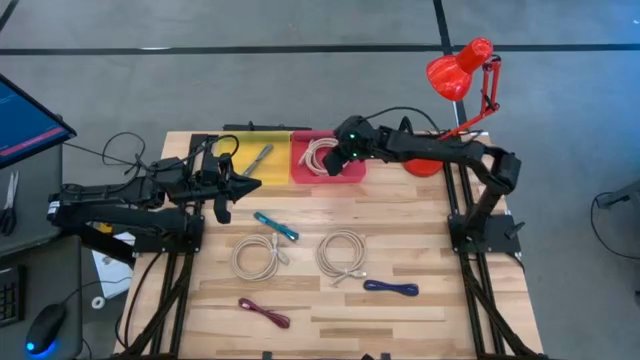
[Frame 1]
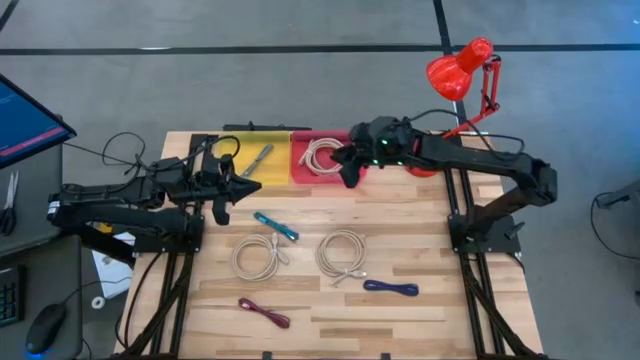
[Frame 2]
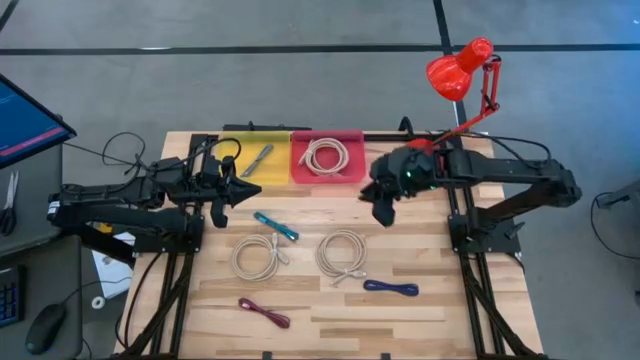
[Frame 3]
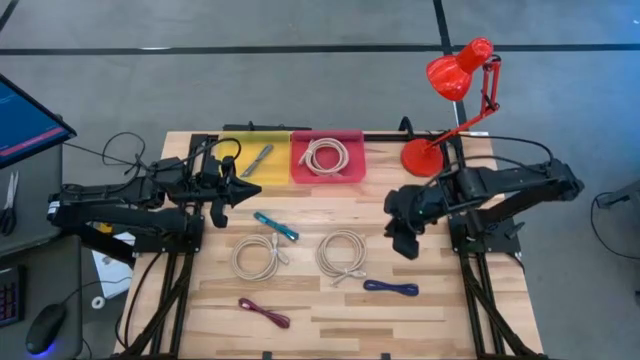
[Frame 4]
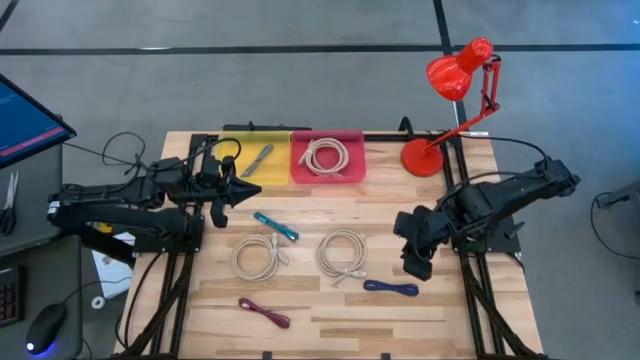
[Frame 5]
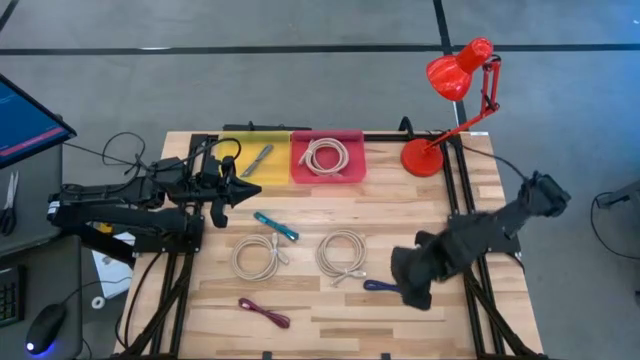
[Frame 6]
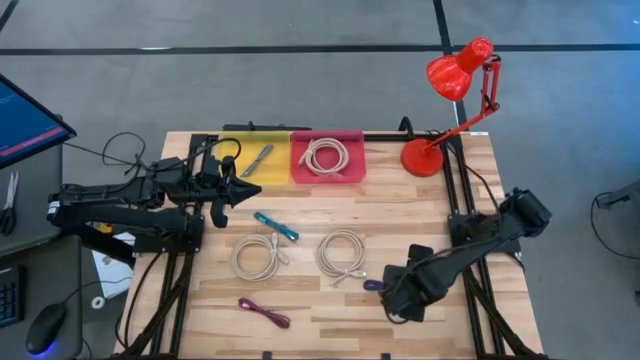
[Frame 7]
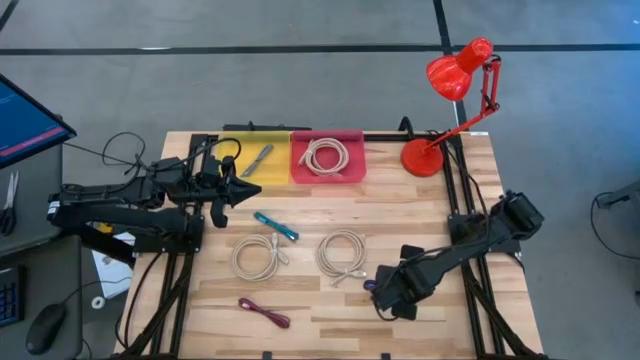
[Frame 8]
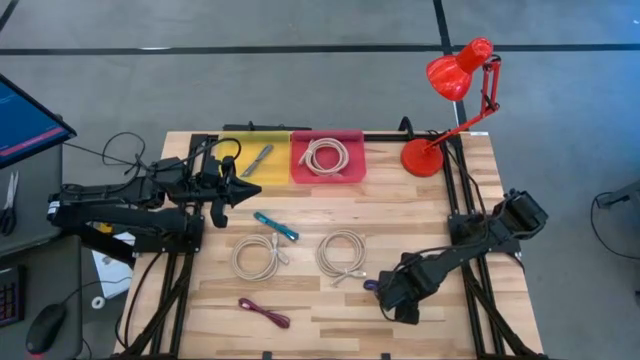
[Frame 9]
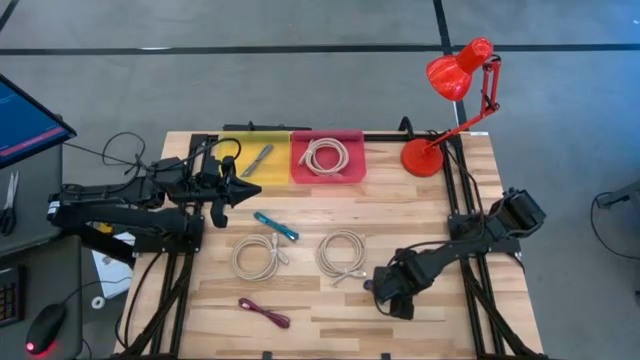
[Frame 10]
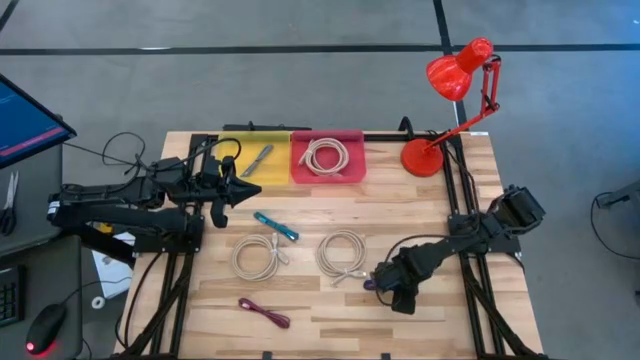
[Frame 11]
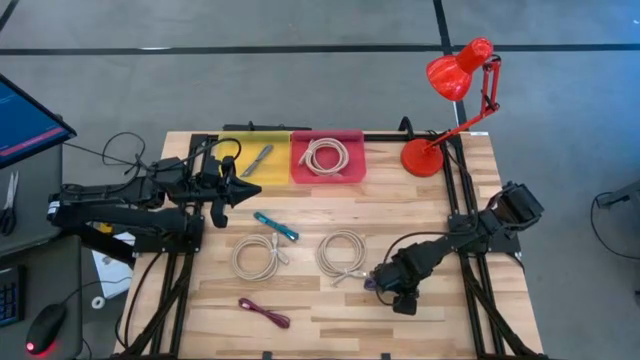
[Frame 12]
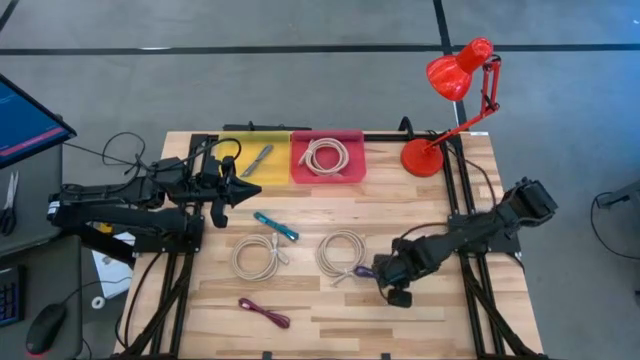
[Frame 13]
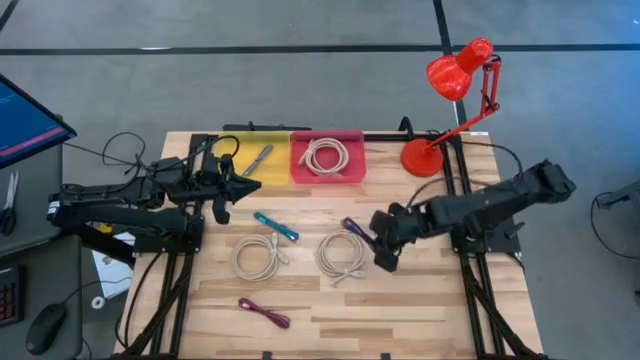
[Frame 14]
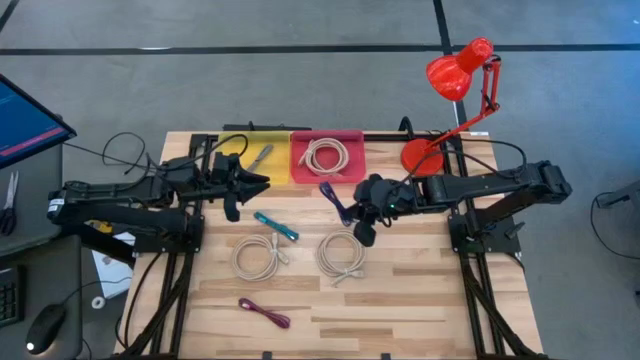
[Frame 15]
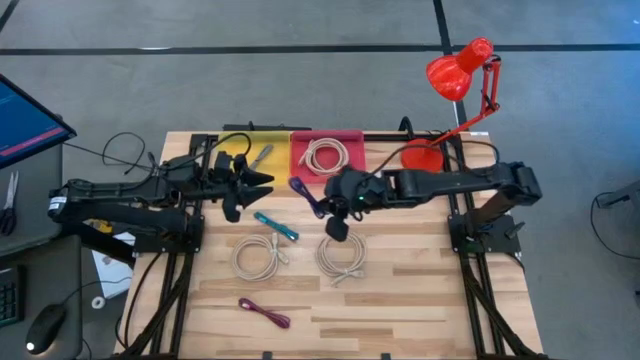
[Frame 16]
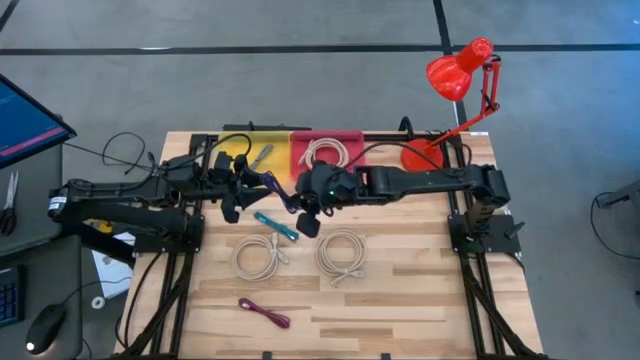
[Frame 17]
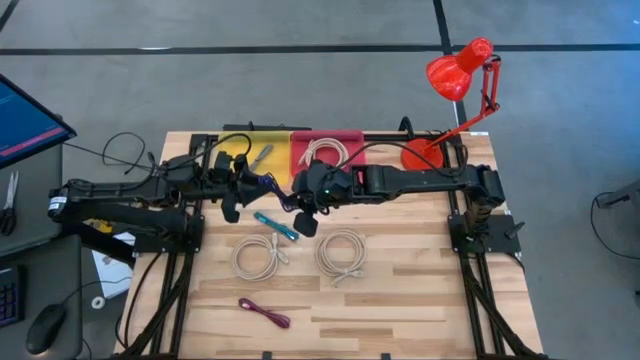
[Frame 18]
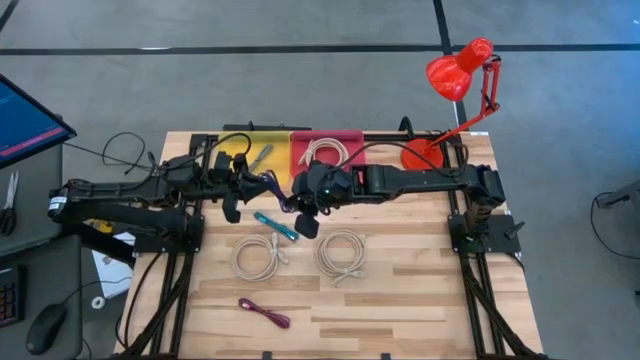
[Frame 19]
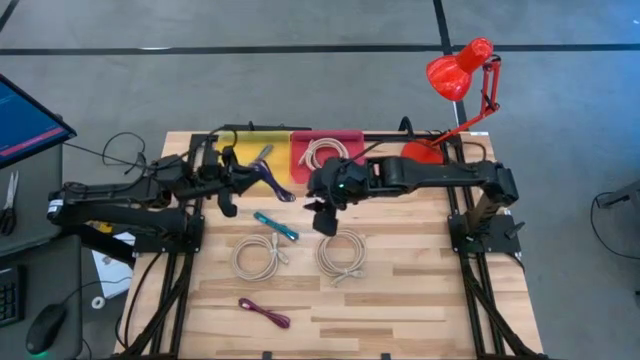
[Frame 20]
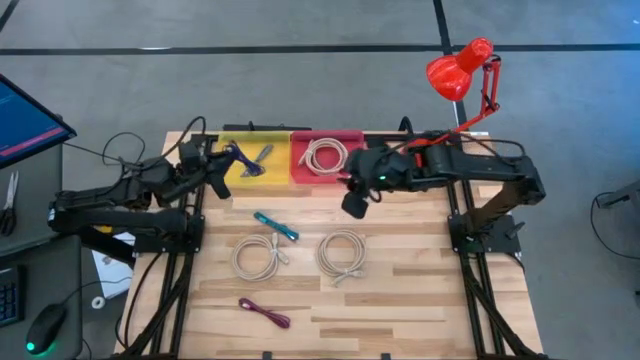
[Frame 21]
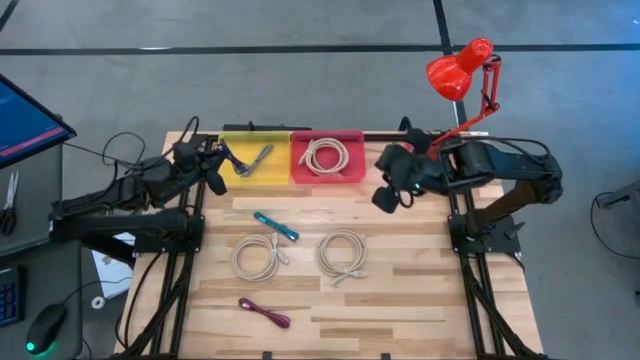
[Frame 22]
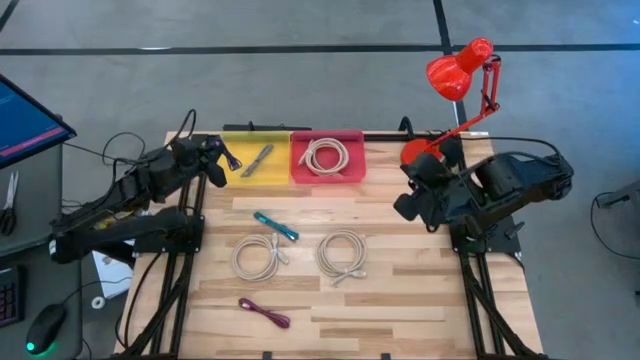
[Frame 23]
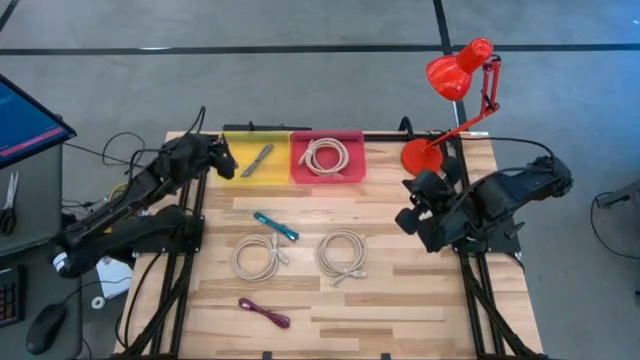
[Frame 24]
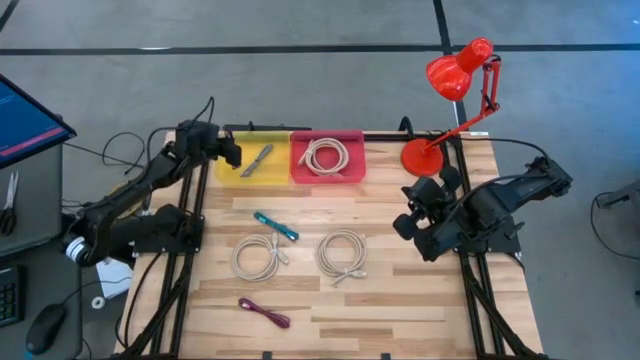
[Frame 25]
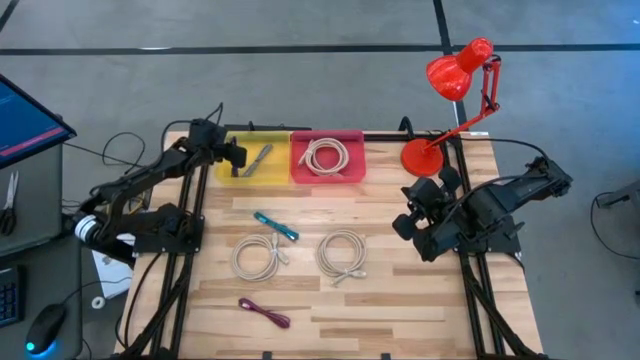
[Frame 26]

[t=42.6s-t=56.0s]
Task: Pick & Place USB Port
Put the violet charger cable into the yellow bin

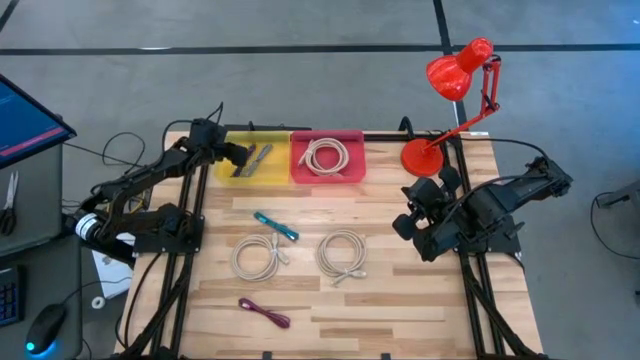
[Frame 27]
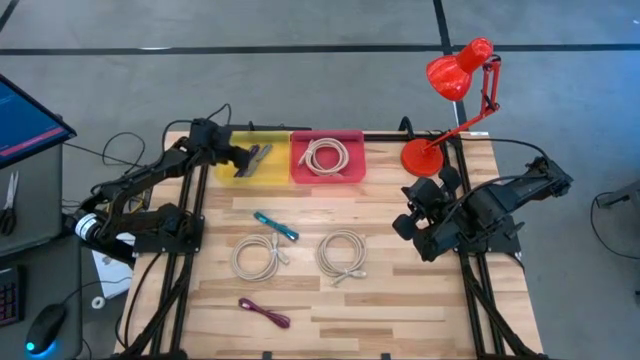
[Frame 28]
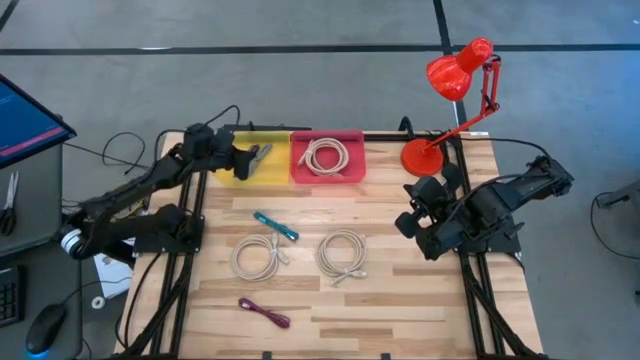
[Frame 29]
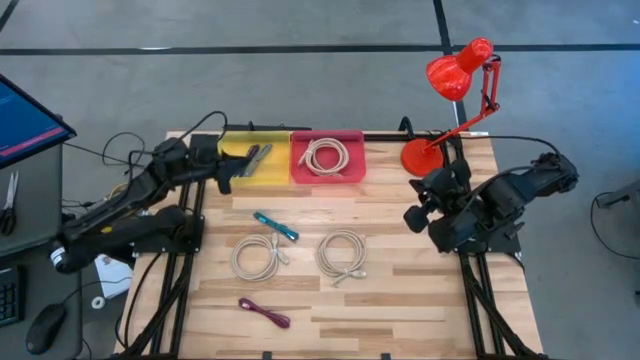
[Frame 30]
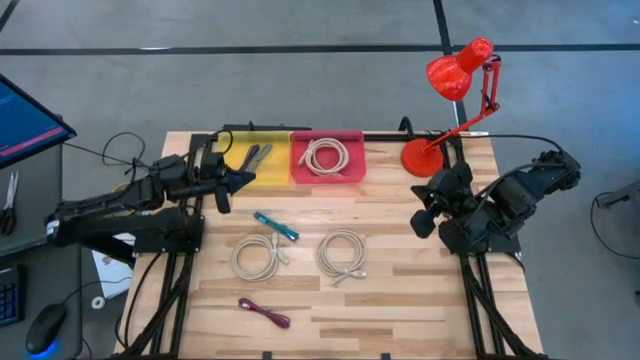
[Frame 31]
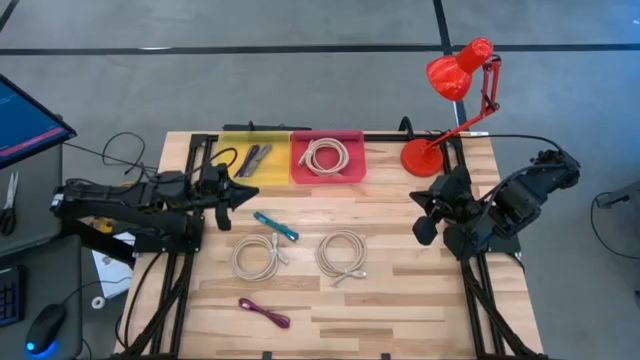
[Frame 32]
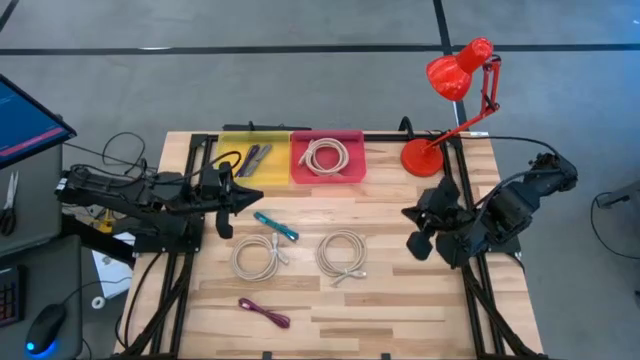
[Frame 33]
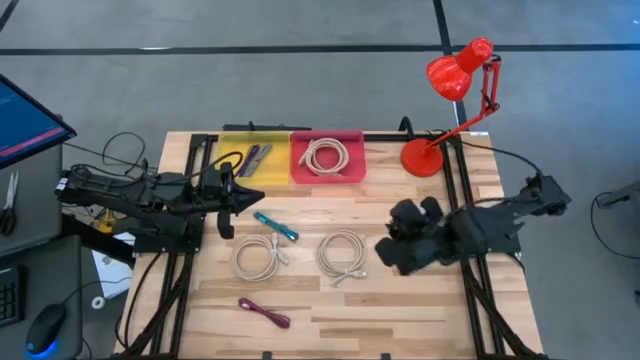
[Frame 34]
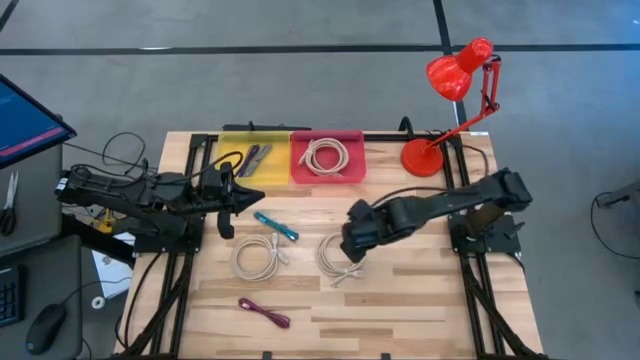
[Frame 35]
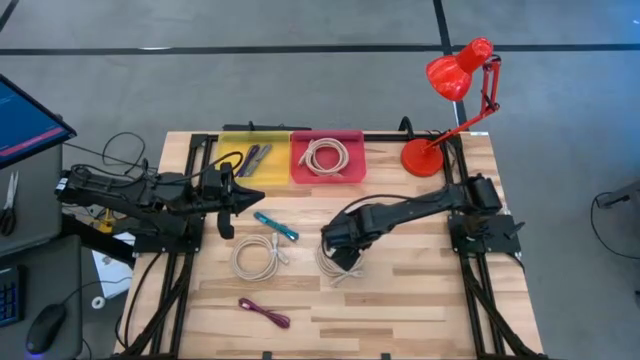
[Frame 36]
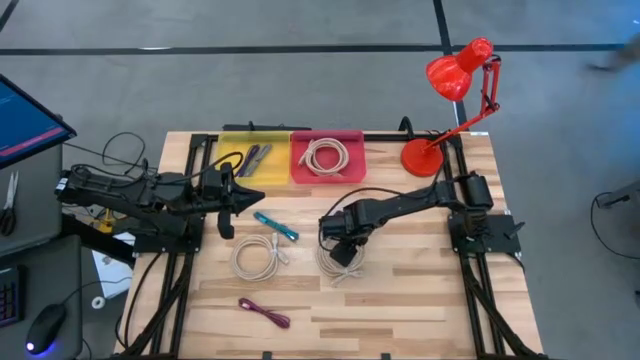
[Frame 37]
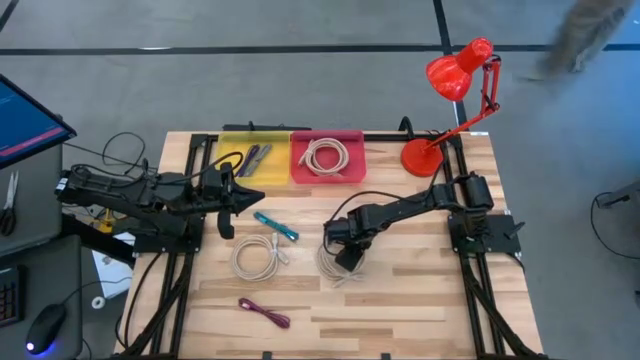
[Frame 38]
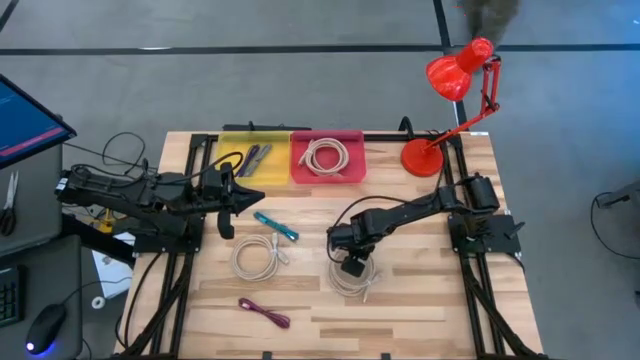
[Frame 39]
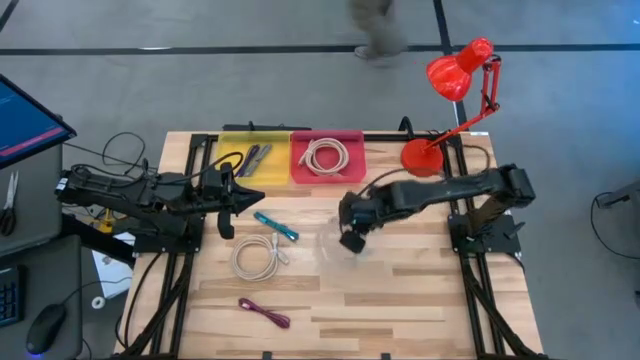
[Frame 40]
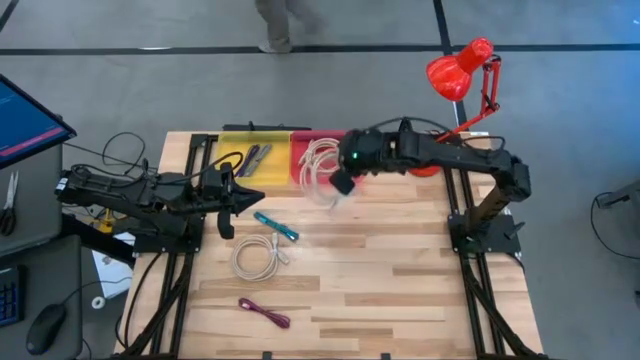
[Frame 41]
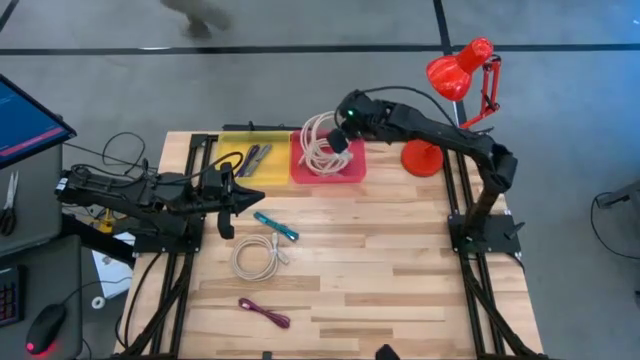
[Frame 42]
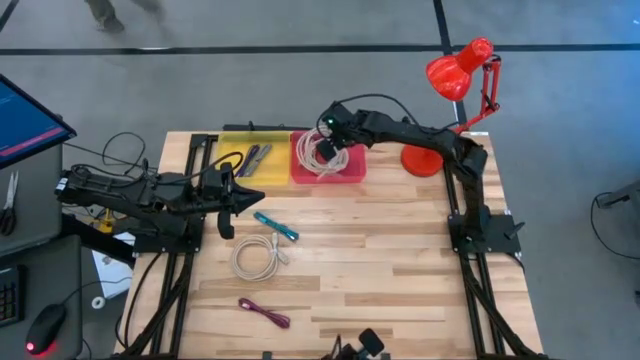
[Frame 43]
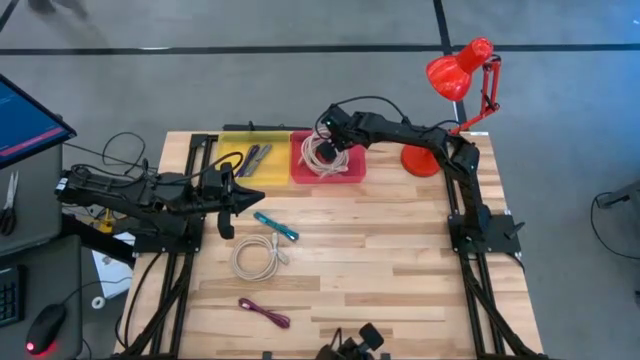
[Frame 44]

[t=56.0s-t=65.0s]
Put the brown HDMI cable into the pink bin
